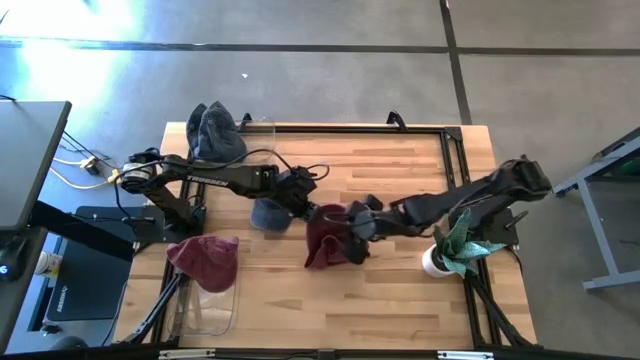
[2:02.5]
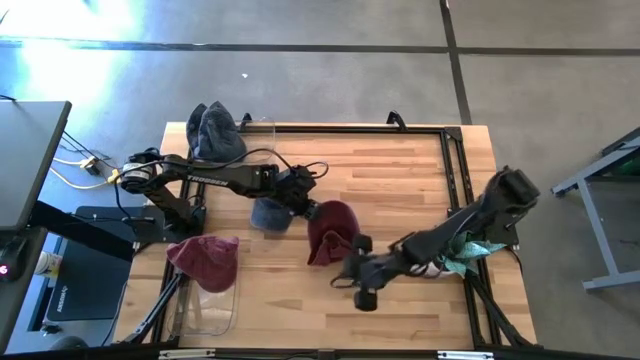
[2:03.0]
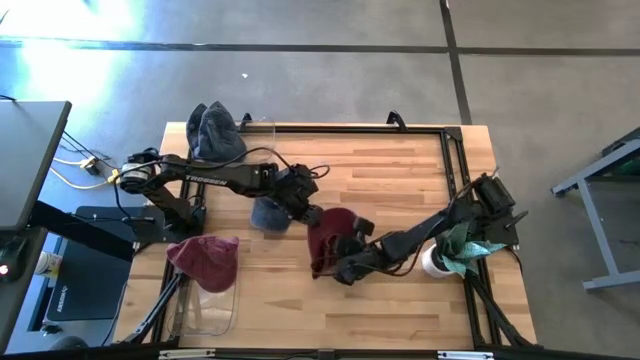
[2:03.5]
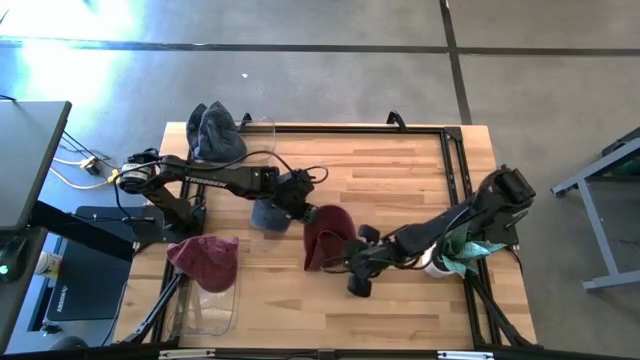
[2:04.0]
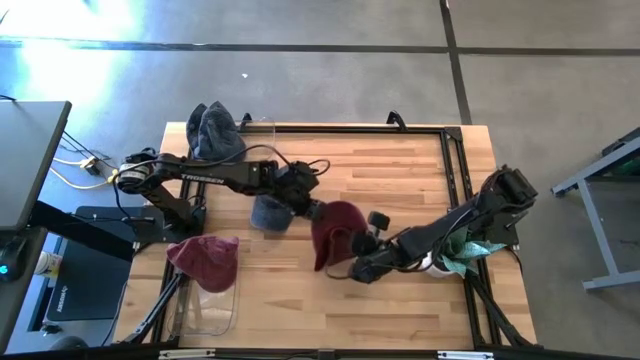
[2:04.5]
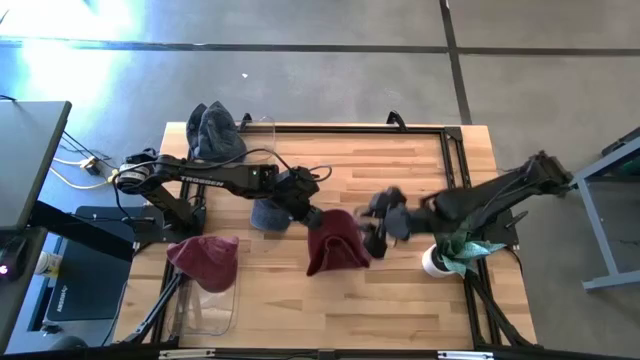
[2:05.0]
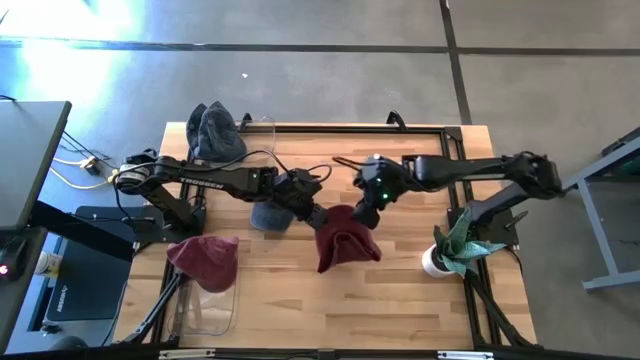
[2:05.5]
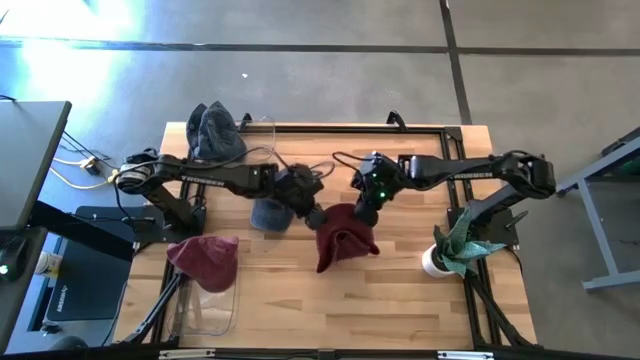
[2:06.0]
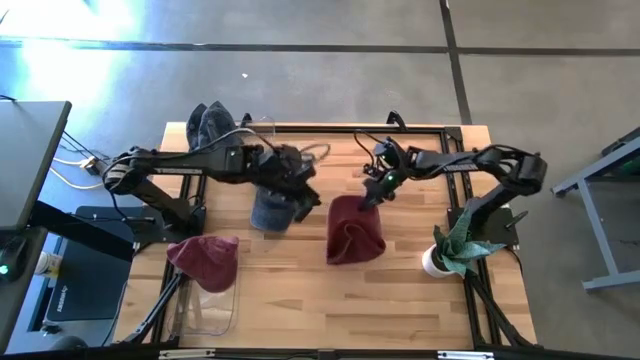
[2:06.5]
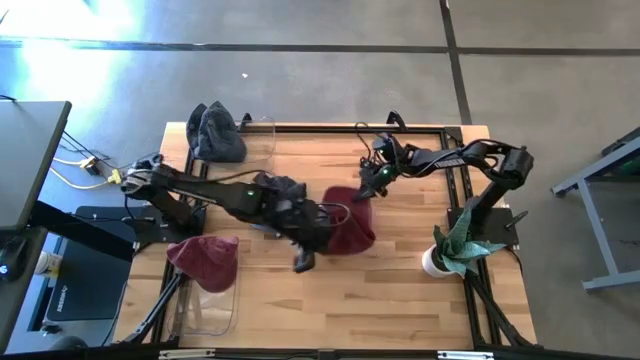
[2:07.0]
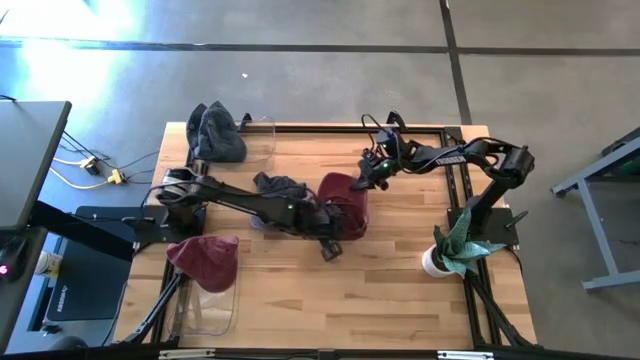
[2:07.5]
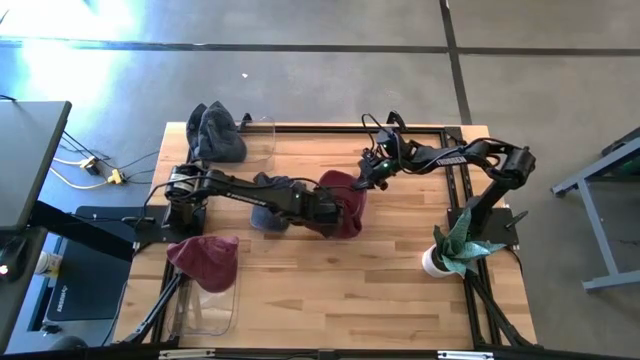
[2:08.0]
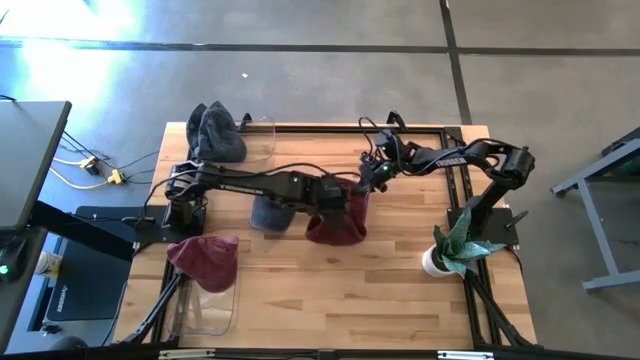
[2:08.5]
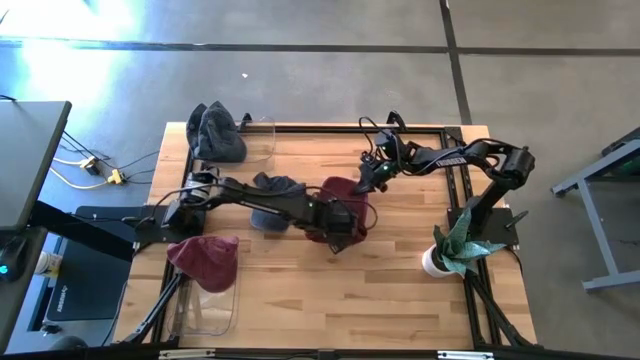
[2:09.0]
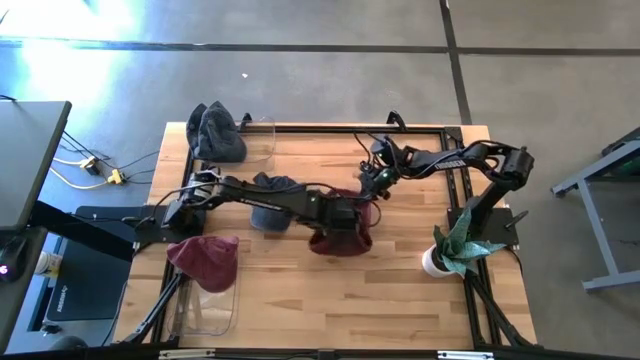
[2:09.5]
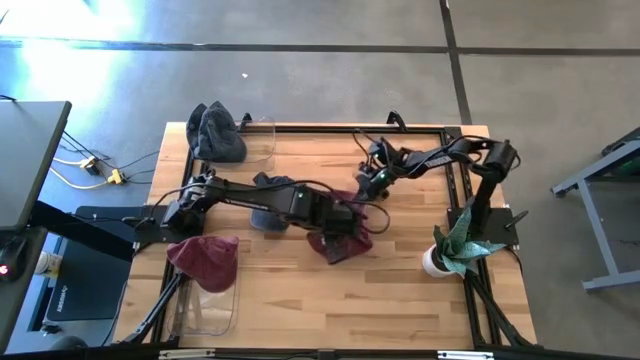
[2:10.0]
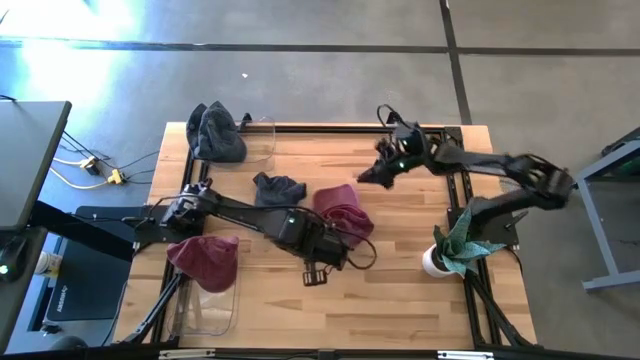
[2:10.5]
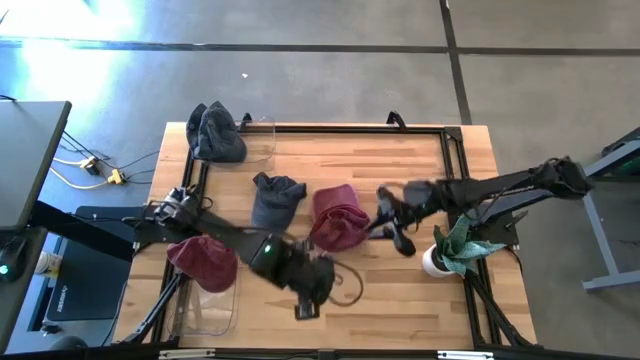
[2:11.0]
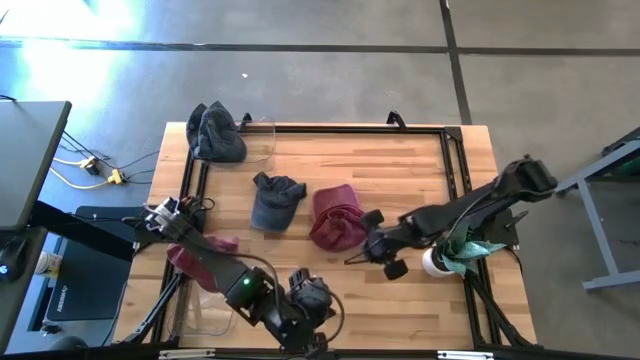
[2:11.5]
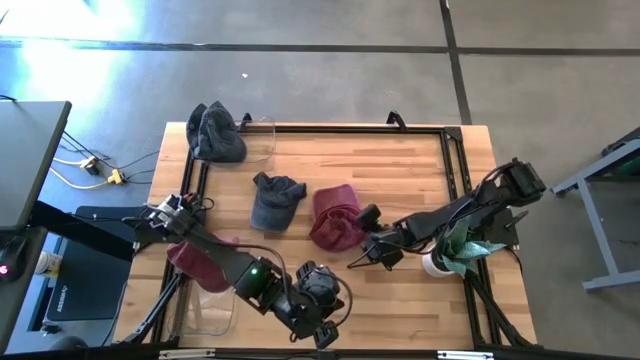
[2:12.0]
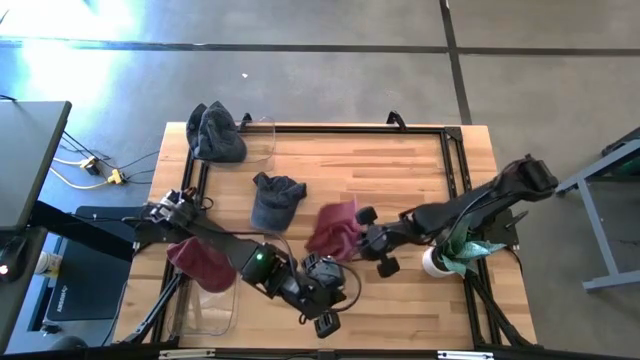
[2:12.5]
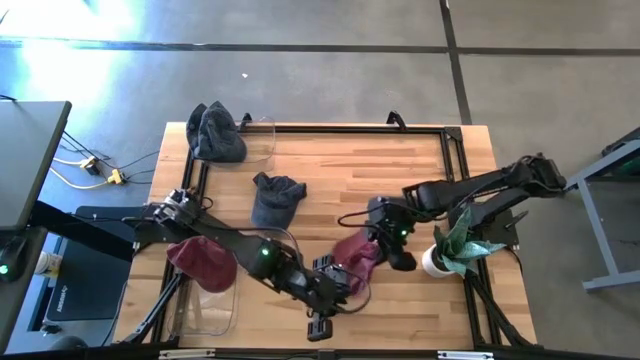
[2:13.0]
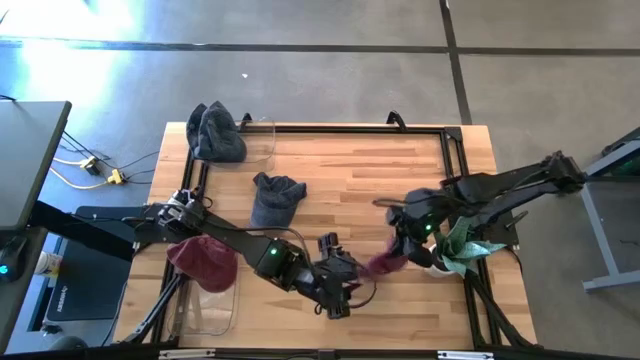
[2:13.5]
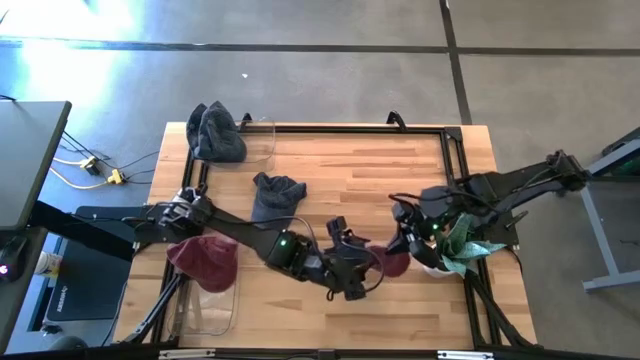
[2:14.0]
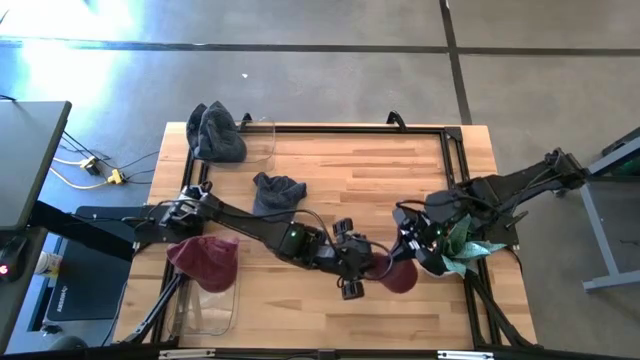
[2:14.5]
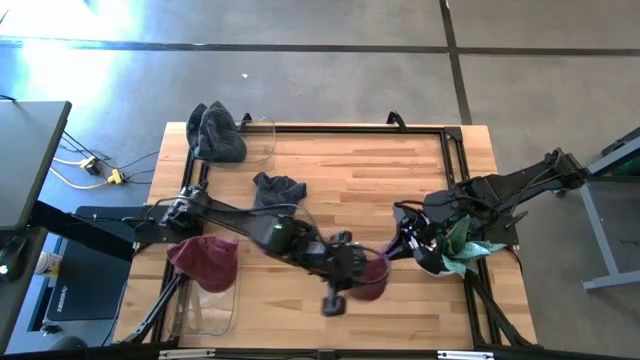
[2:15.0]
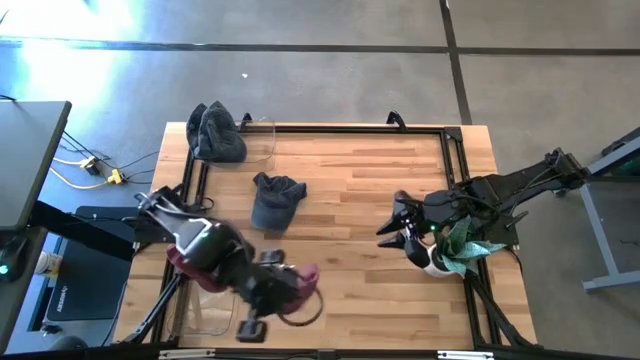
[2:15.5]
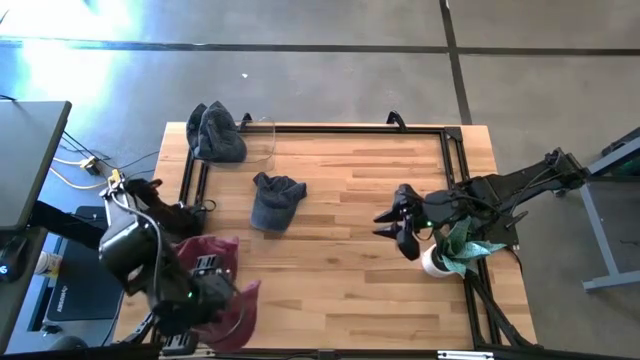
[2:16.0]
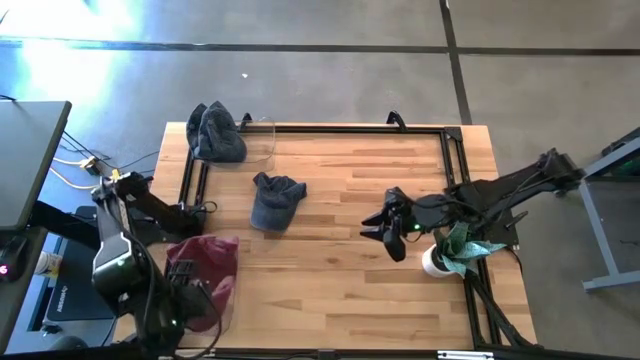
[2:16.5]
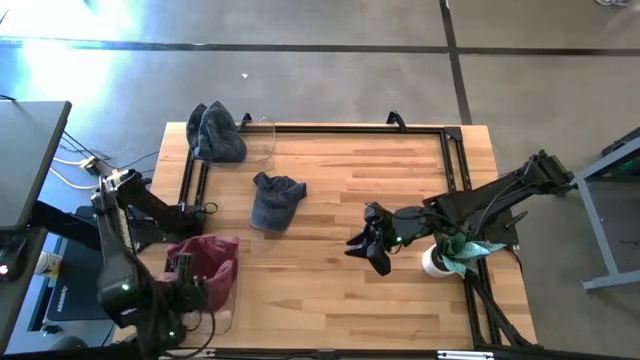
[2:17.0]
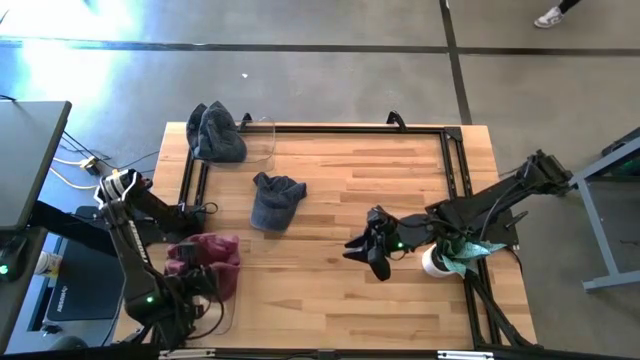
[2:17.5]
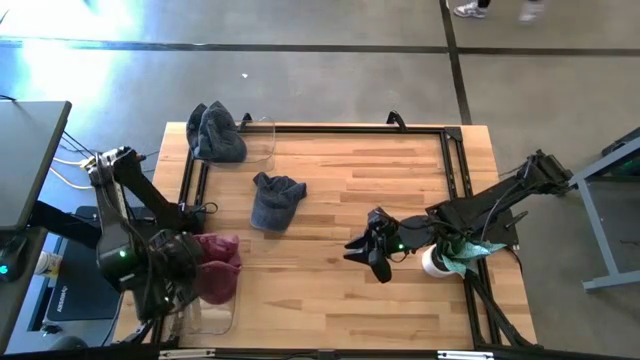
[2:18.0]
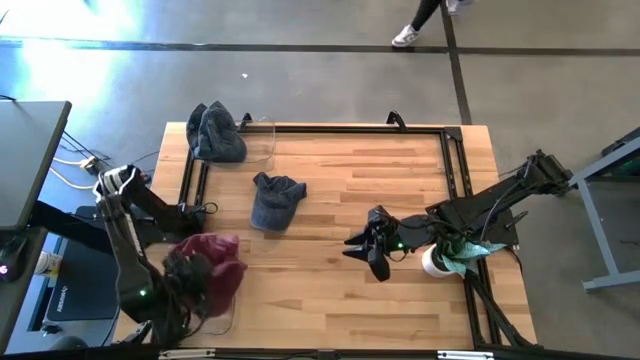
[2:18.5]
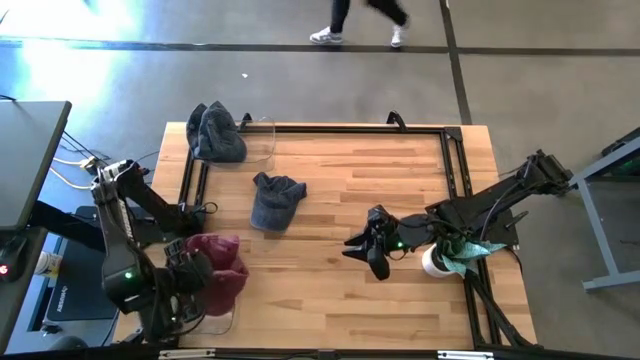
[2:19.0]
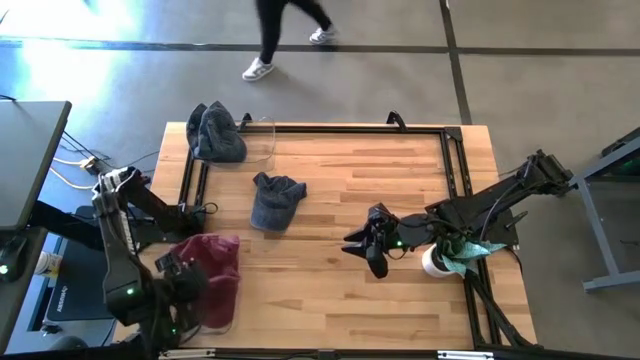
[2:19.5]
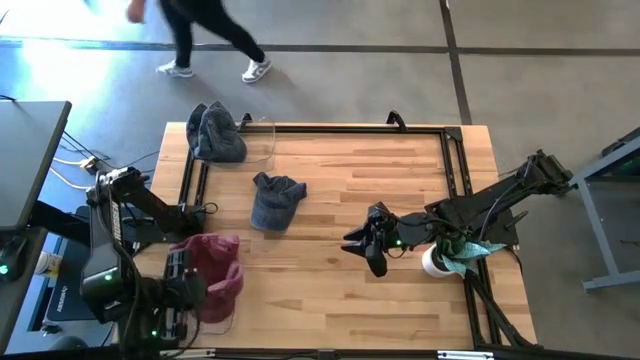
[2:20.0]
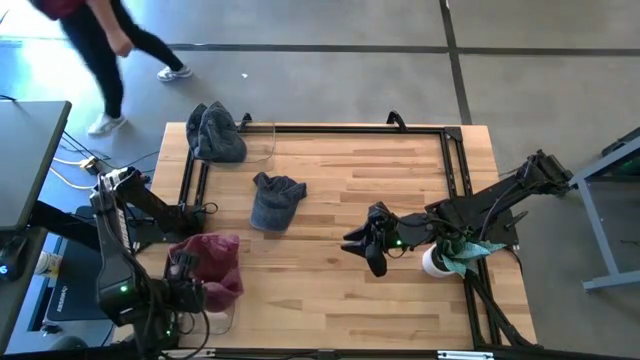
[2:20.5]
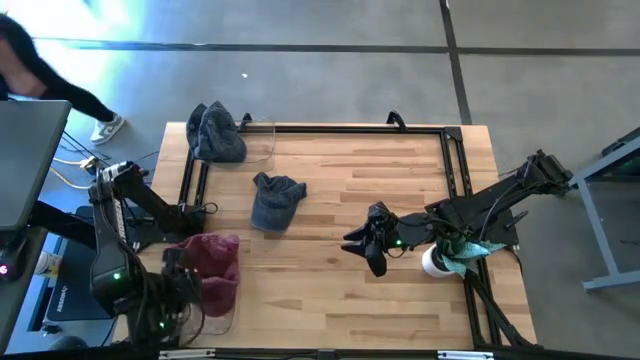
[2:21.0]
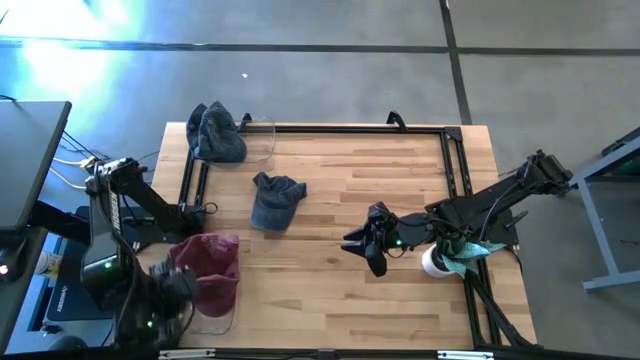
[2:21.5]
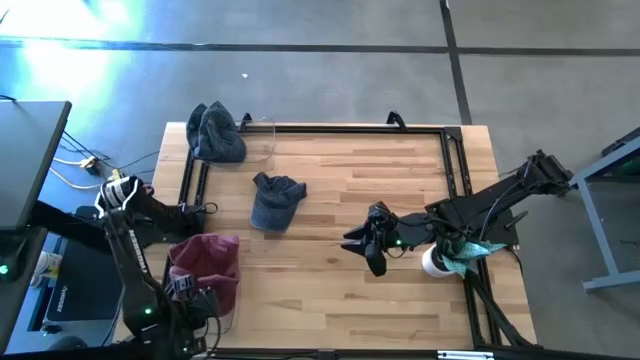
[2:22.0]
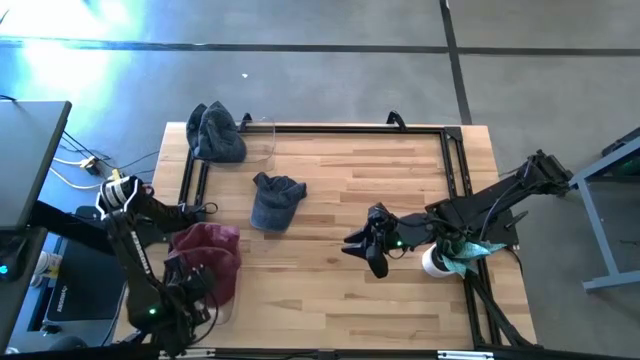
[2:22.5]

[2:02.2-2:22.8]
Task: Pick & Place hat
Put the red cap into the bottom transparent bin
